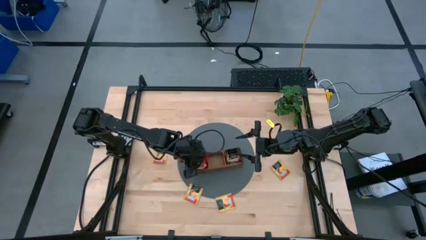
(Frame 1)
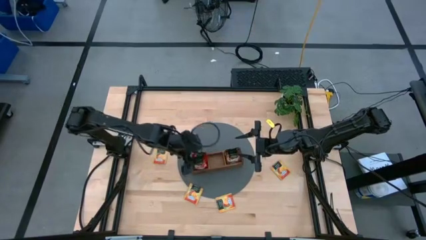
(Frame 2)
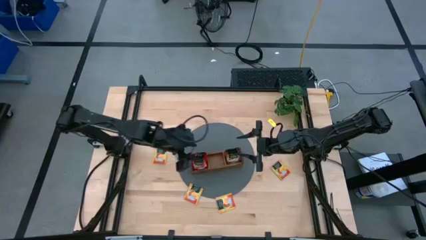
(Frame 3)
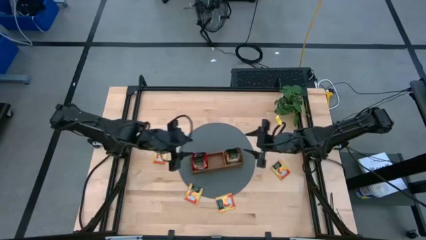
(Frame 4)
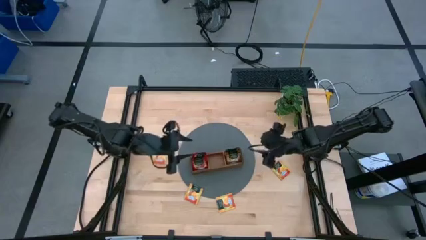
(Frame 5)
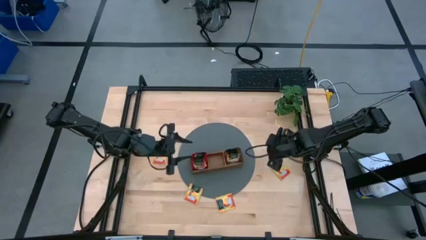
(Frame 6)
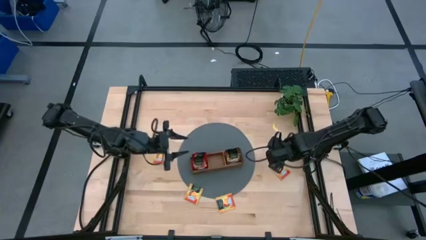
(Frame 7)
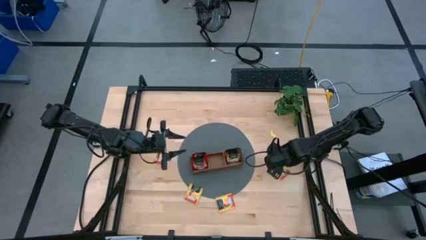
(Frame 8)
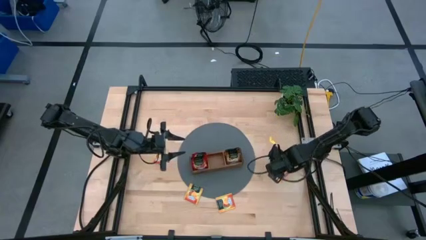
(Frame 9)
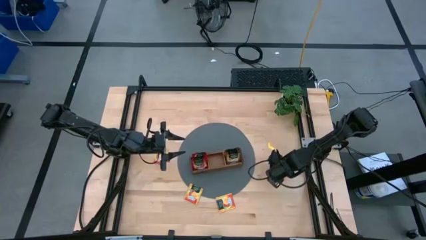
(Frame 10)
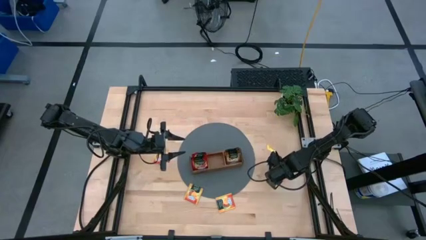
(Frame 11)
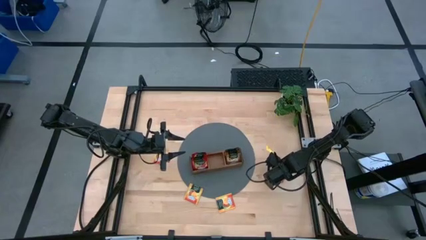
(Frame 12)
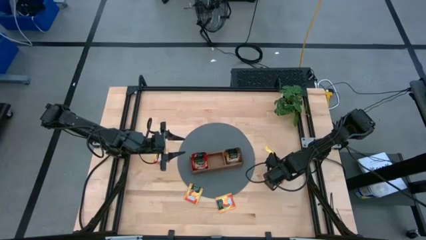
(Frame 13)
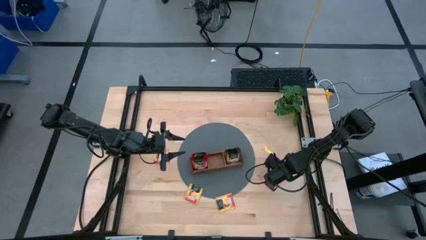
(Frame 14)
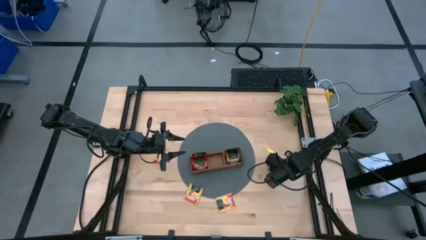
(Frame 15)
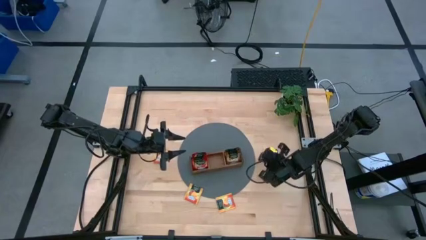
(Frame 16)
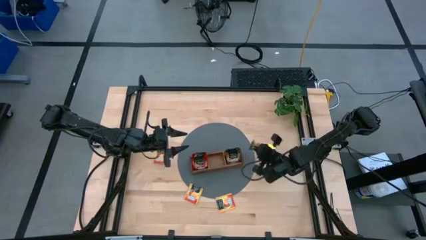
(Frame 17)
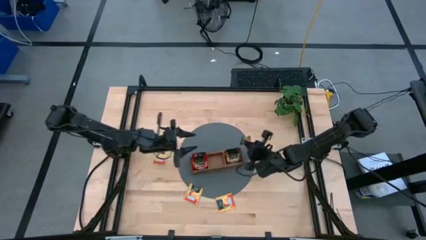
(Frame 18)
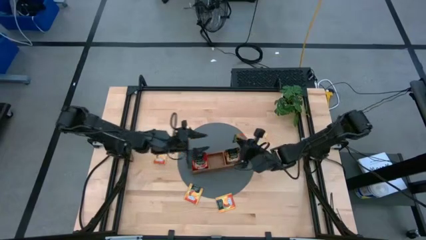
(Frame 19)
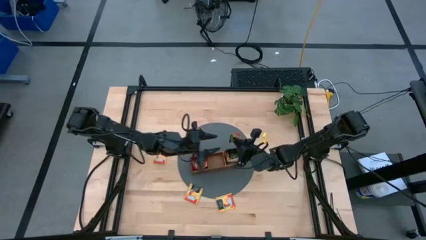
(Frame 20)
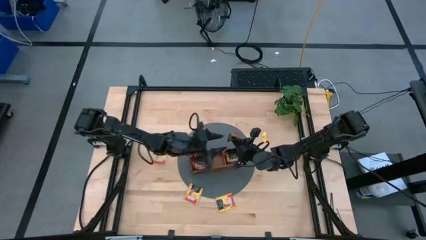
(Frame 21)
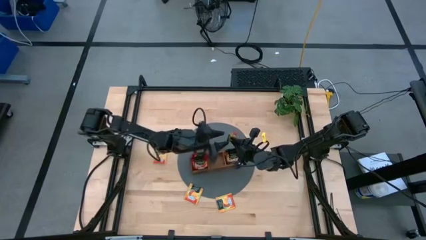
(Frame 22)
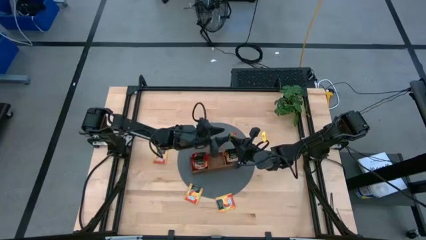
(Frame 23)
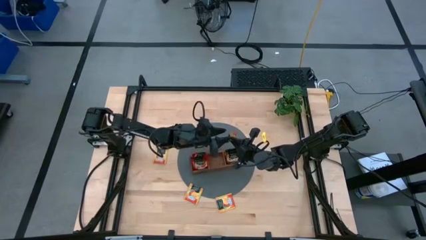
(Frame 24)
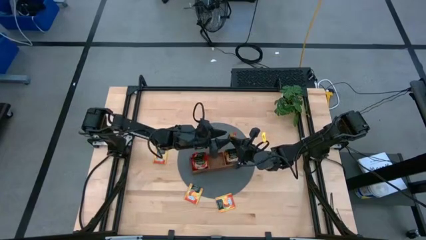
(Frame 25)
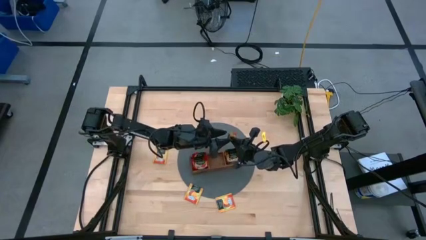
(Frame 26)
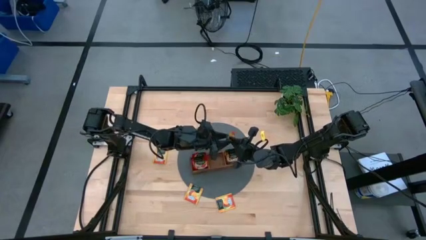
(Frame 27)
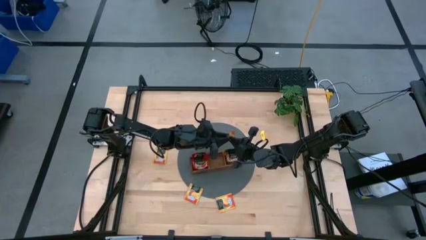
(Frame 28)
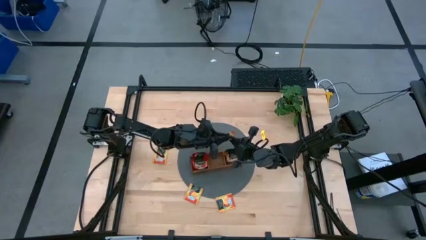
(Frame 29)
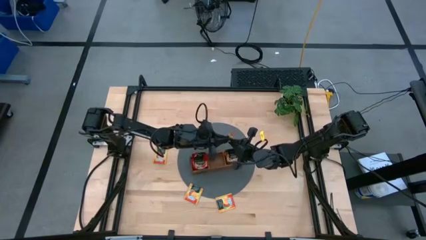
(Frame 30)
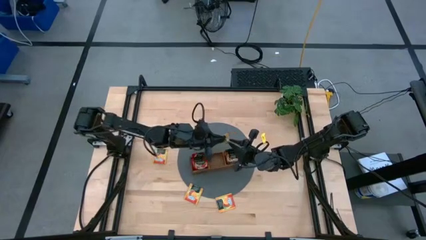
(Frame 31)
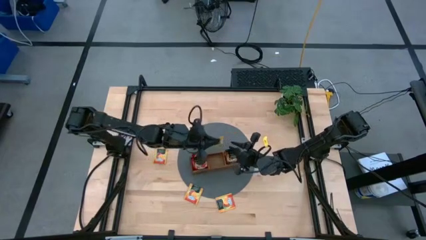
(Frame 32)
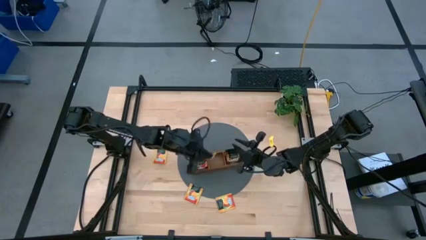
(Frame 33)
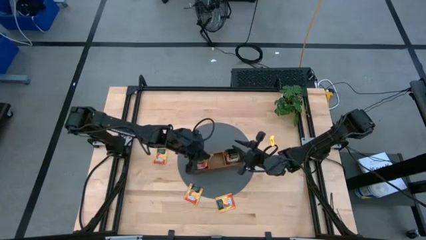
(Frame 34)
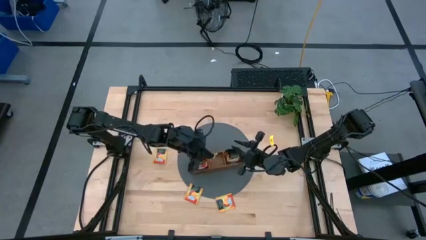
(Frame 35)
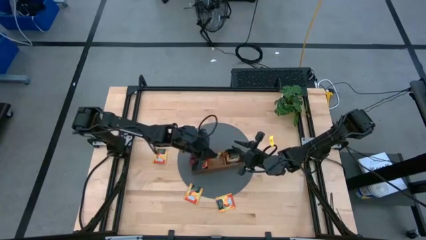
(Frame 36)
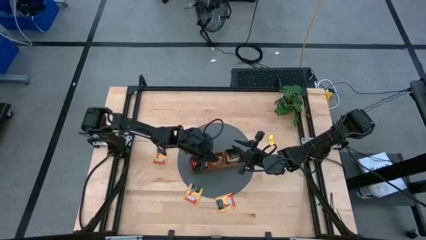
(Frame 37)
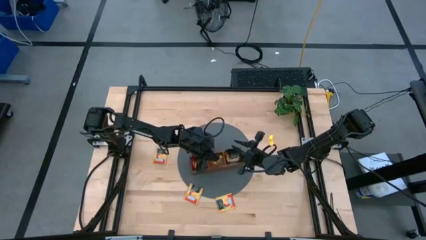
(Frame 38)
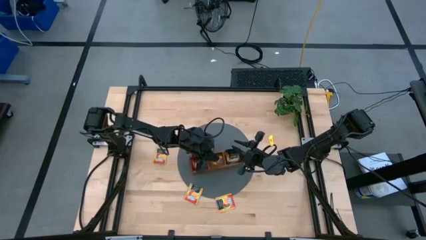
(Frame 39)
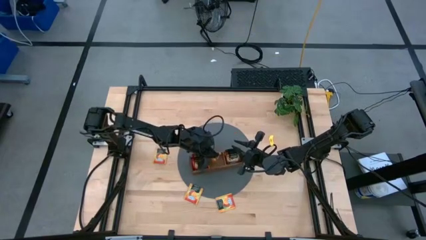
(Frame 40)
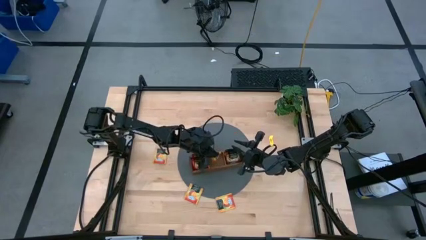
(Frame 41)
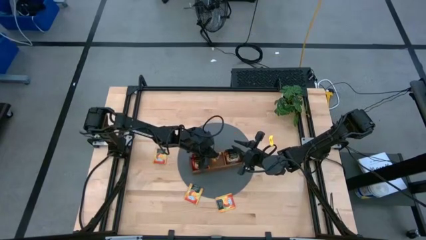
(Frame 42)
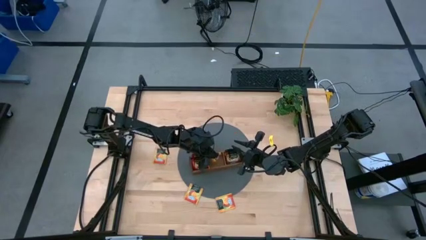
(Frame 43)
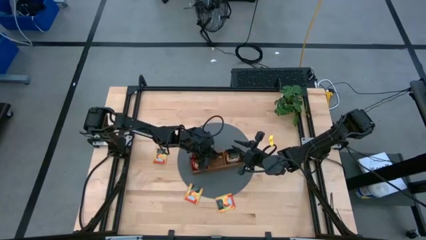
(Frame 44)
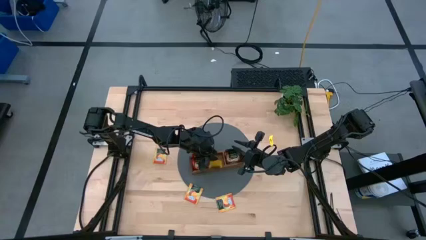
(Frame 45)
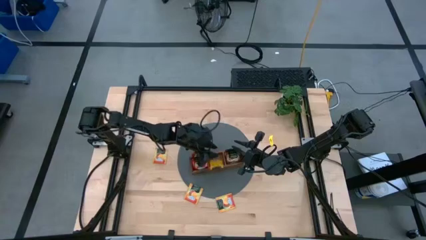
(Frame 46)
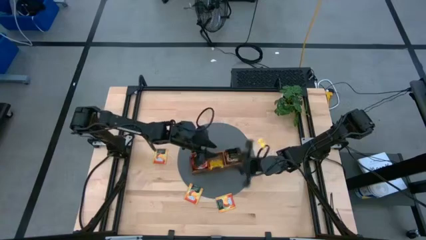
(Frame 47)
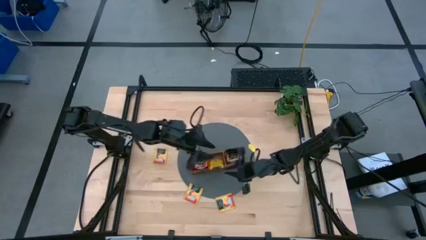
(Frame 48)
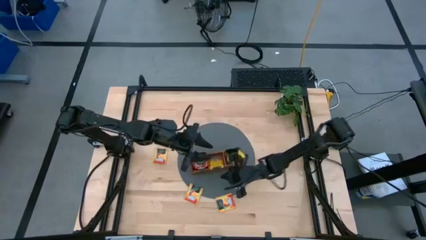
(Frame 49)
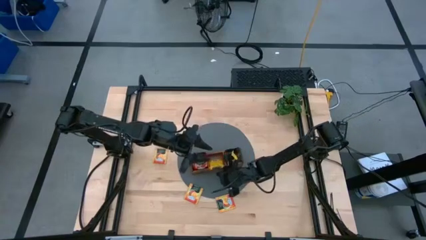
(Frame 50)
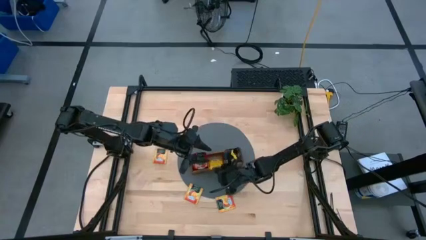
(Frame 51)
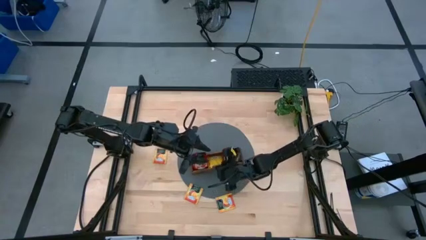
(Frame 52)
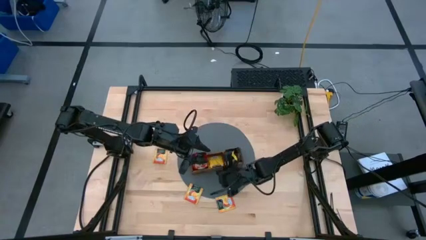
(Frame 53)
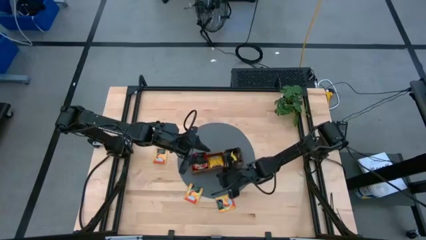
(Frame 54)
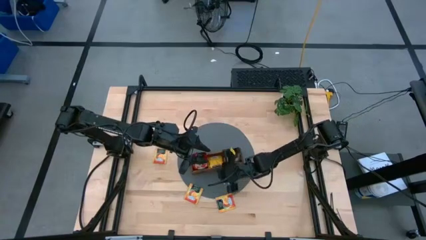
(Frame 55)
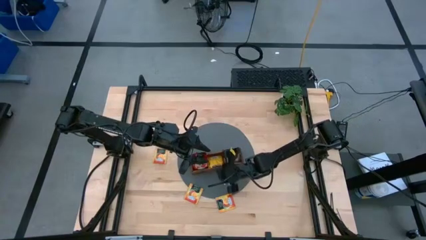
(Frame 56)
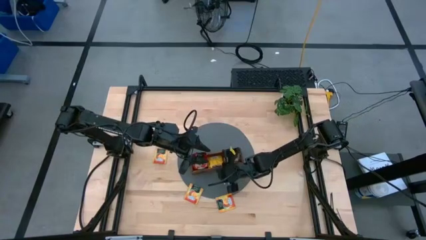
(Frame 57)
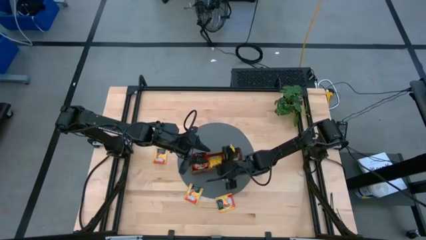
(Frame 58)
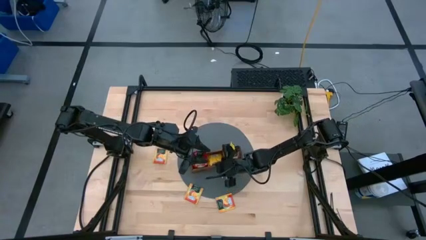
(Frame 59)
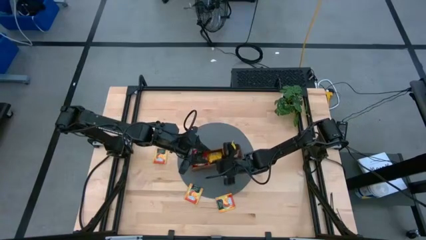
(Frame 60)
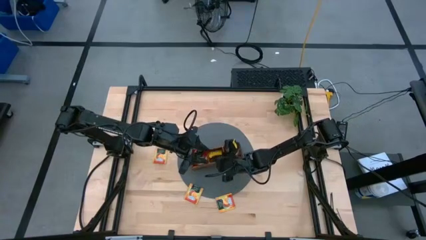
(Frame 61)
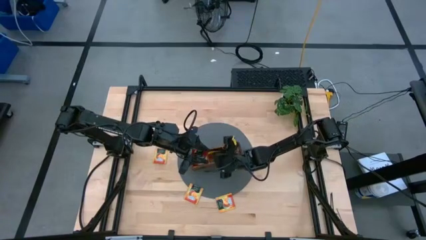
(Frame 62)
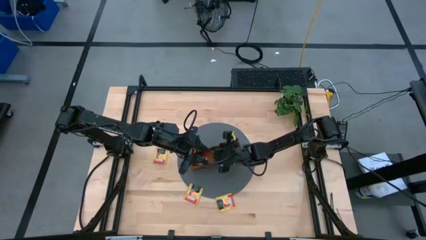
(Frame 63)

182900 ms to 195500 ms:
Task: Pick & Place Tea
Put the yellow tea bag into the middle section of the wooden organizer

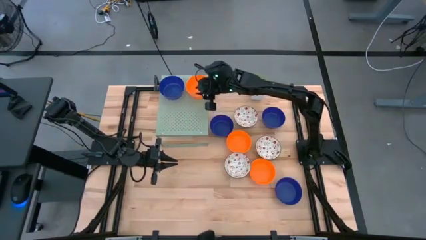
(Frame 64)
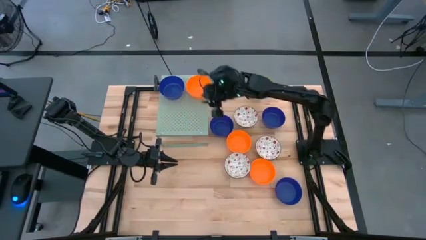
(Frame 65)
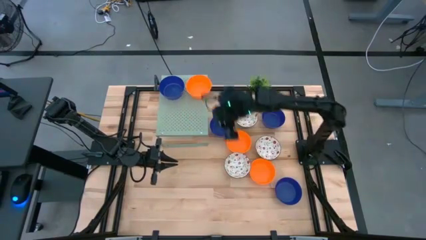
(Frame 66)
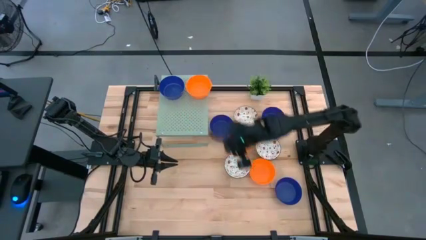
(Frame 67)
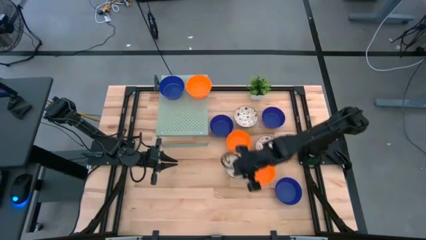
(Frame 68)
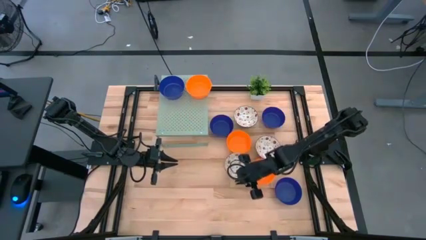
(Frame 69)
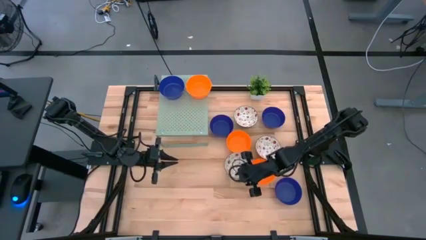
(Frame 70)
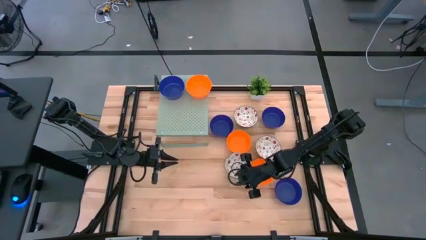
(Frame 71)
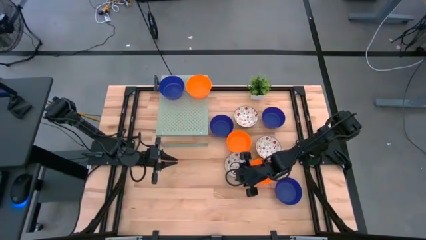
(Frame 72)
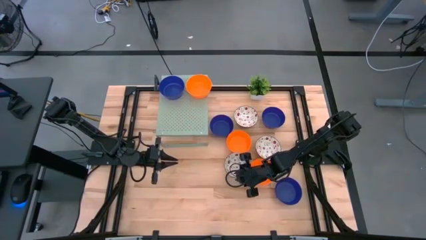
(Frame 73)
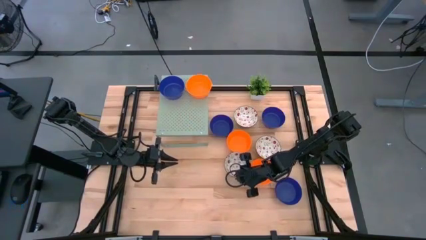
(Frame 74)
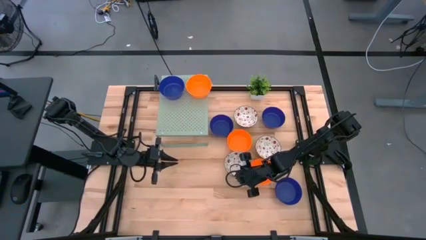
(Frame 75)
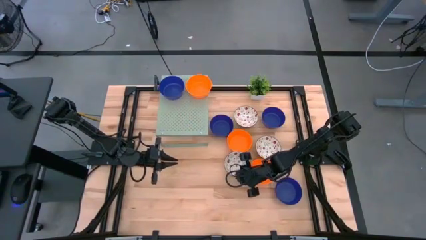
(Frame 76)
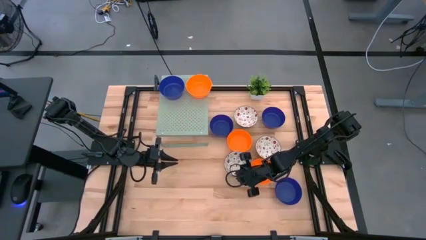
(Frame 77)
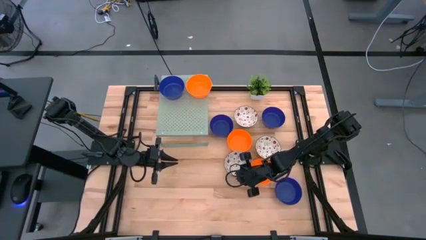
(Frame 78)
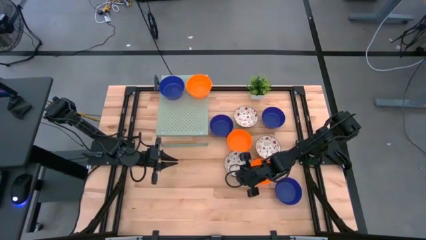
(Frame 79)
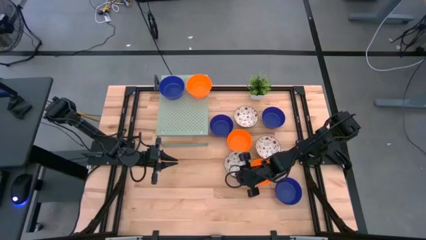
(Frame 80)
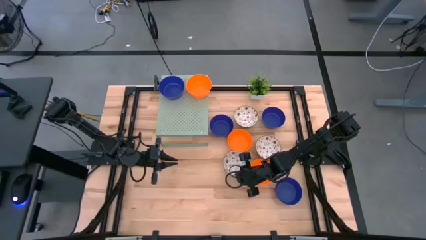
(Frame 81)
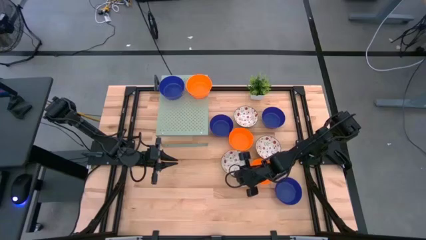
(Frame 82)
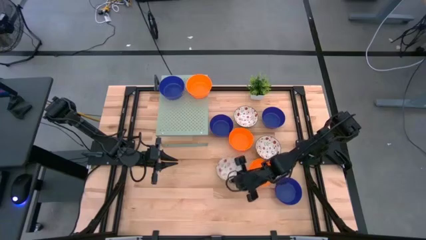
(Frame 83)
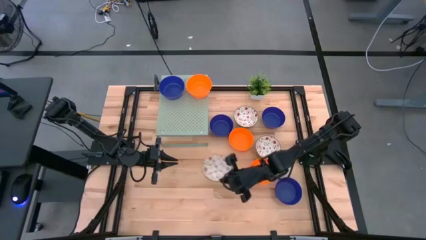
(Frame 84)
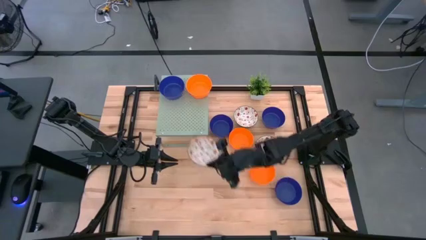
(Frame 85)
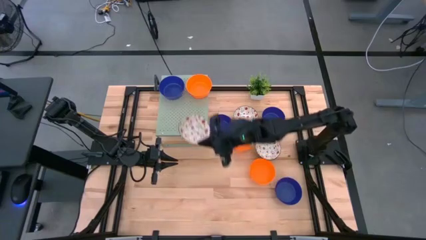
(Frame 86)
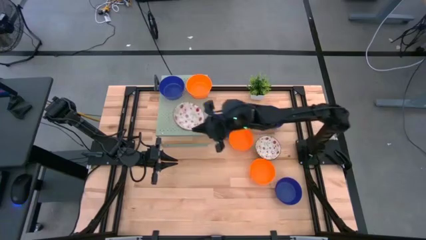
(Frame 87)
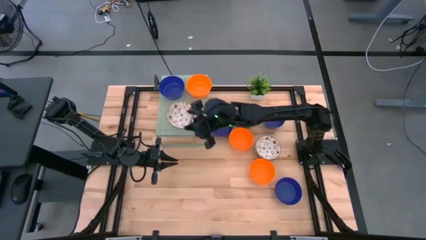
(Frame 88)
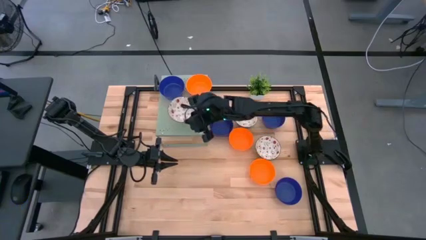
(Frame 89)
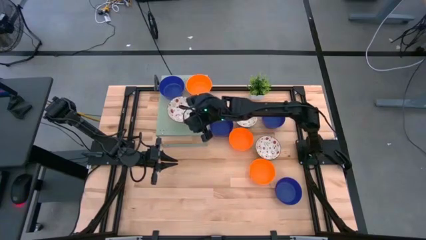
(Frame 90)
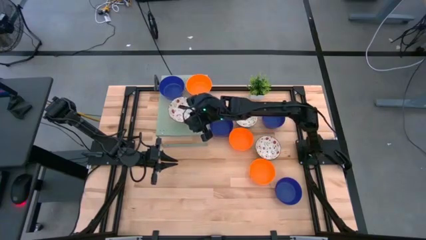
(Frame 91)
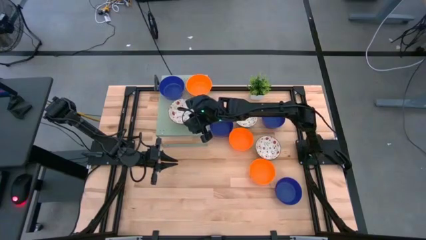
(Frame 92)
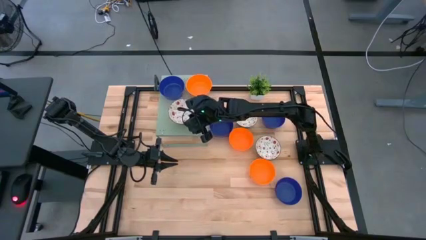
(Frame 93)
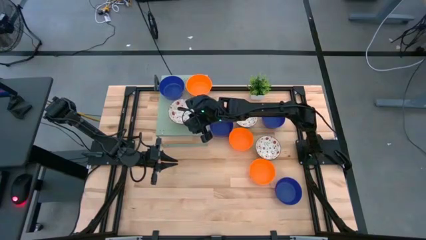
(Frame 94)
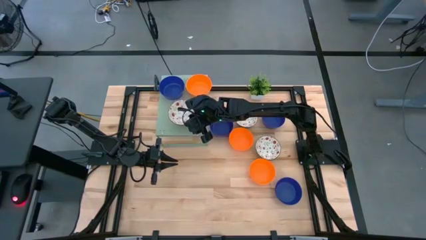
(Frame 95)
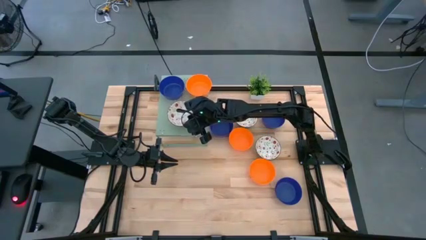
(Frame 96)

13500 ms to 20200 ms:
Task: Pick & Place Mini bowls
Put the left bottom white bowl on the shelf
